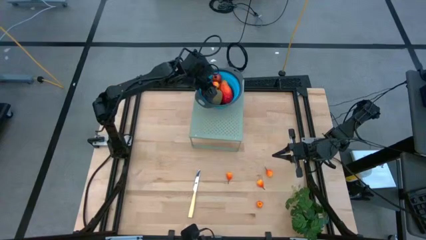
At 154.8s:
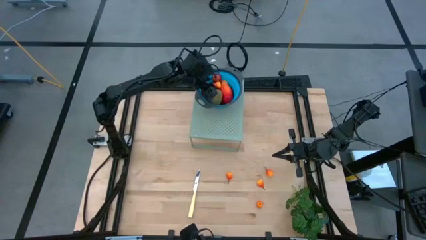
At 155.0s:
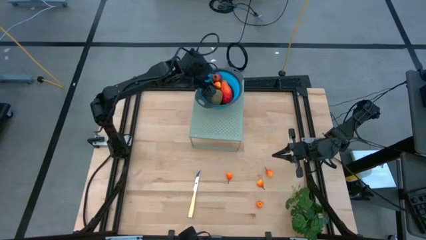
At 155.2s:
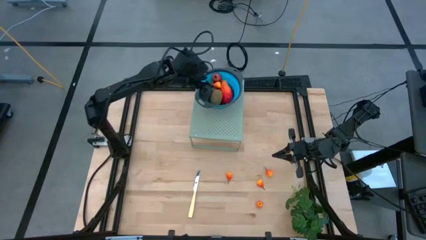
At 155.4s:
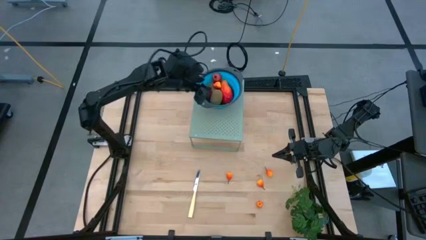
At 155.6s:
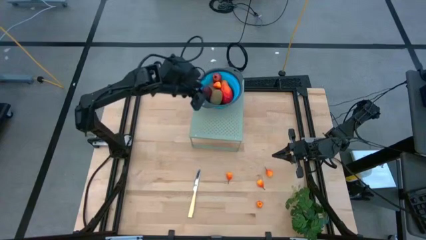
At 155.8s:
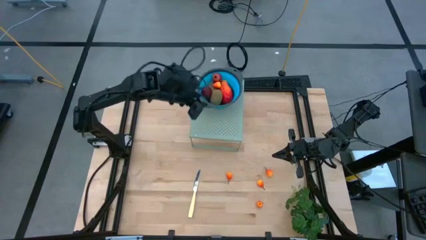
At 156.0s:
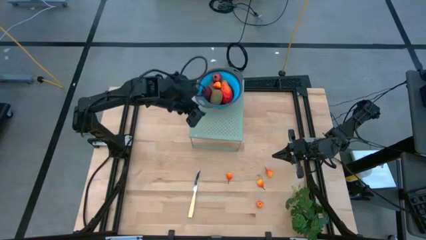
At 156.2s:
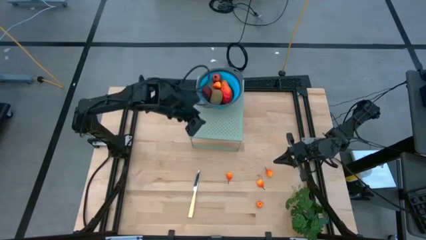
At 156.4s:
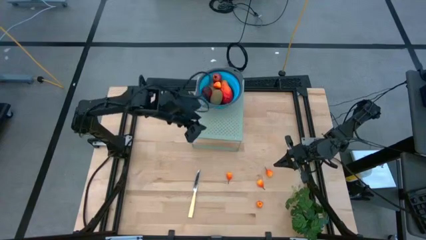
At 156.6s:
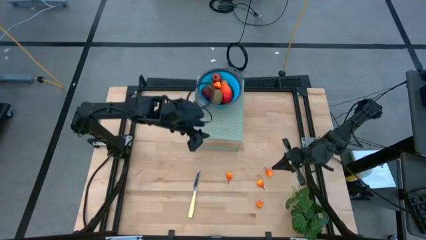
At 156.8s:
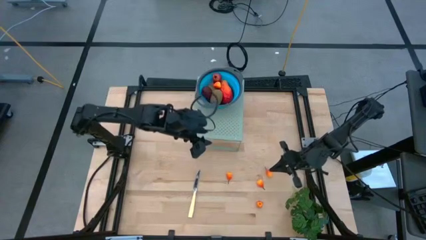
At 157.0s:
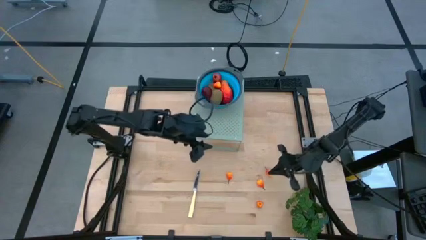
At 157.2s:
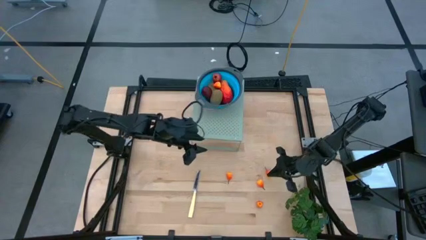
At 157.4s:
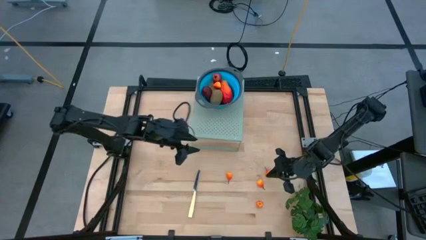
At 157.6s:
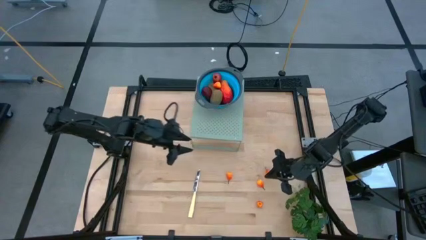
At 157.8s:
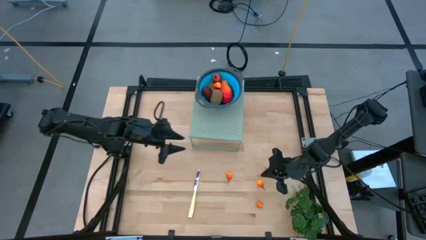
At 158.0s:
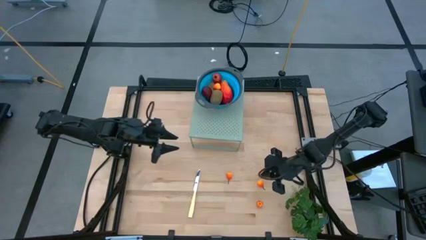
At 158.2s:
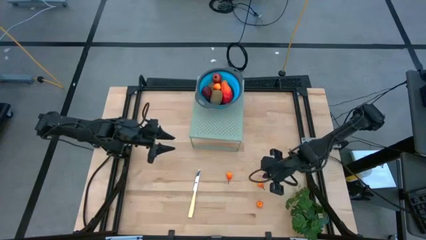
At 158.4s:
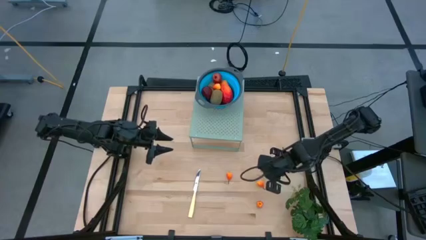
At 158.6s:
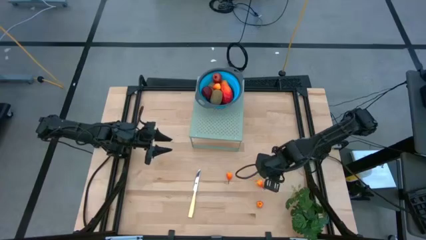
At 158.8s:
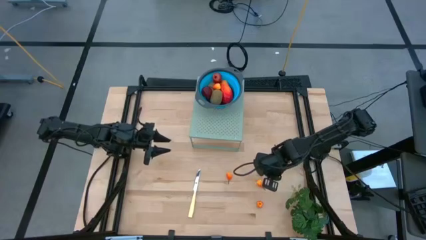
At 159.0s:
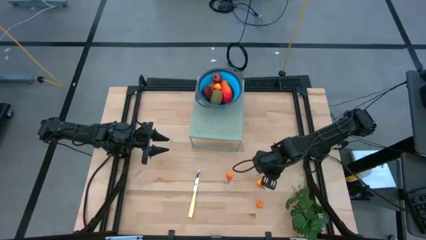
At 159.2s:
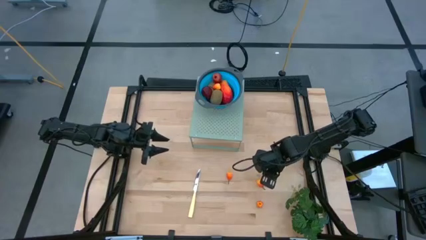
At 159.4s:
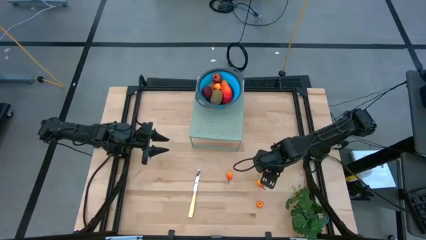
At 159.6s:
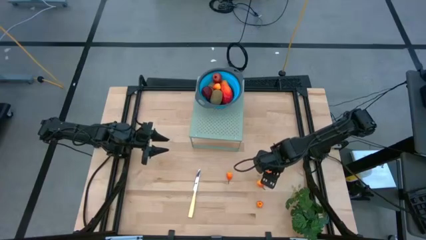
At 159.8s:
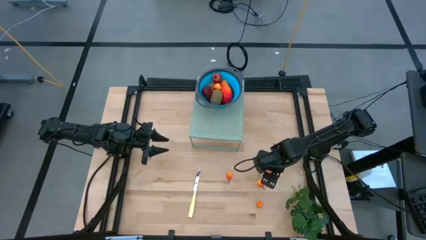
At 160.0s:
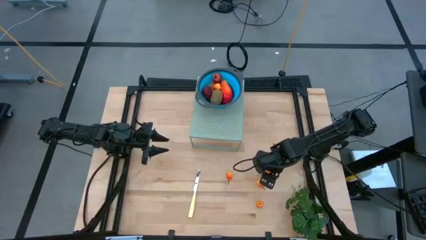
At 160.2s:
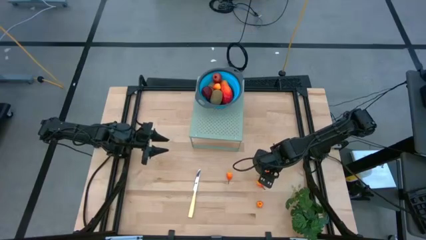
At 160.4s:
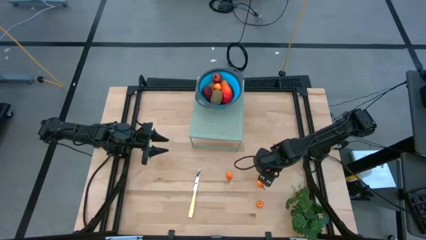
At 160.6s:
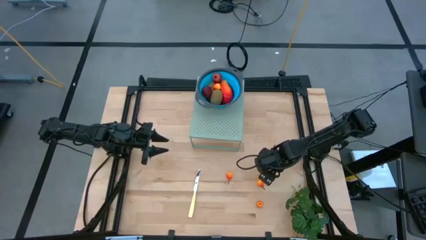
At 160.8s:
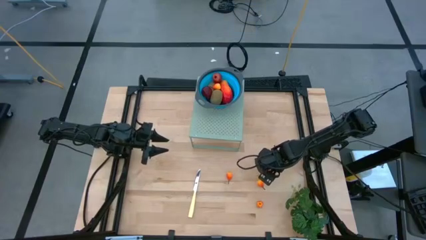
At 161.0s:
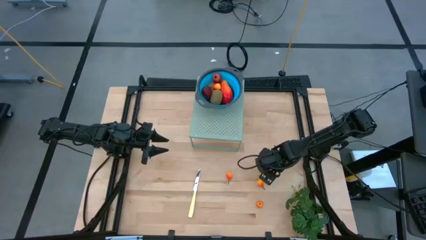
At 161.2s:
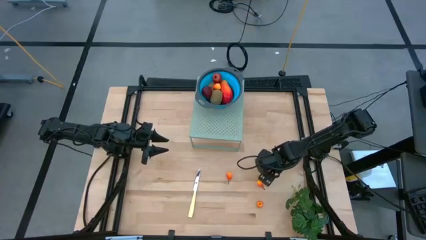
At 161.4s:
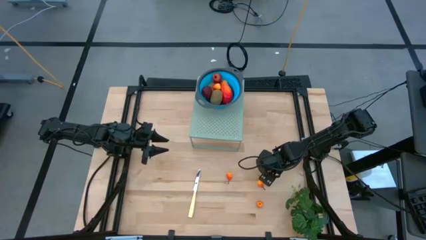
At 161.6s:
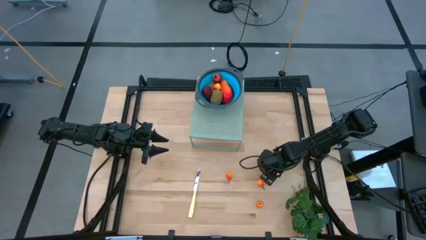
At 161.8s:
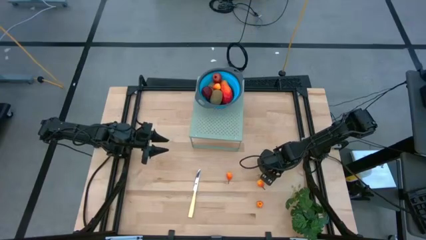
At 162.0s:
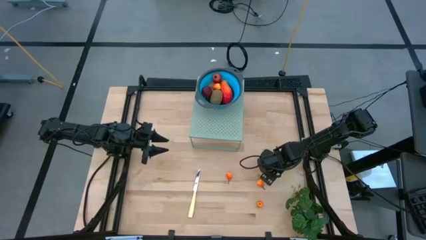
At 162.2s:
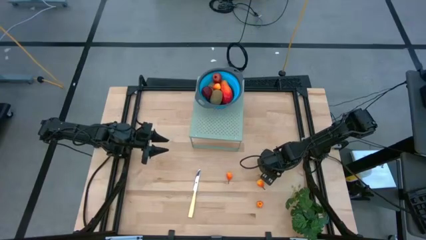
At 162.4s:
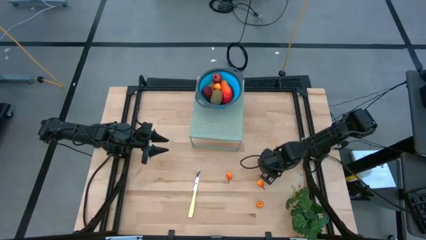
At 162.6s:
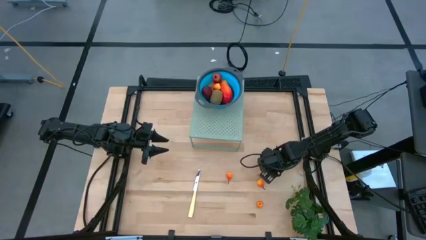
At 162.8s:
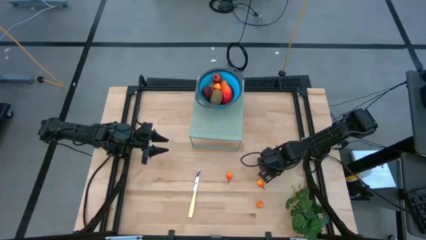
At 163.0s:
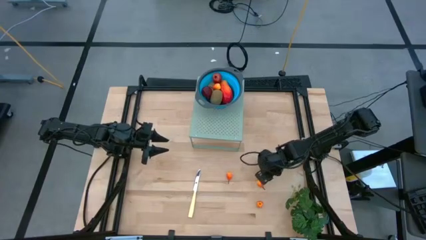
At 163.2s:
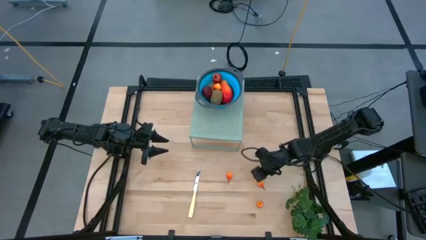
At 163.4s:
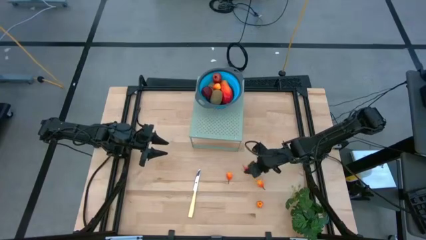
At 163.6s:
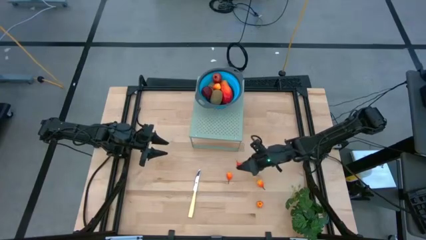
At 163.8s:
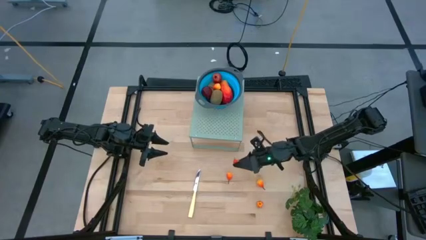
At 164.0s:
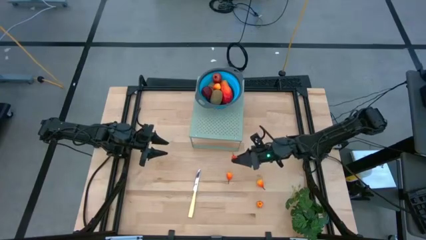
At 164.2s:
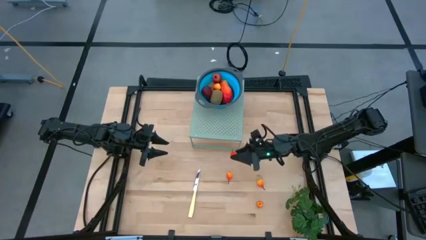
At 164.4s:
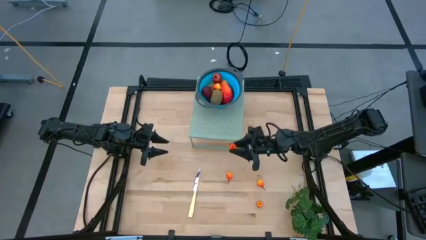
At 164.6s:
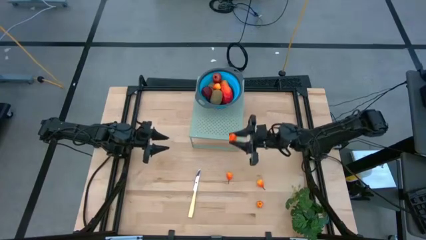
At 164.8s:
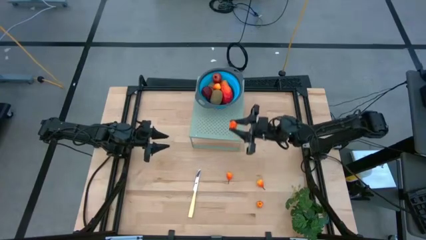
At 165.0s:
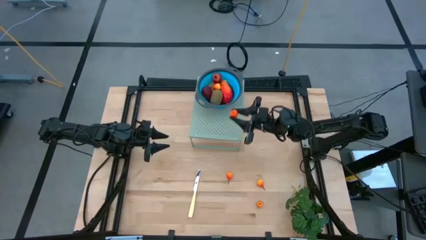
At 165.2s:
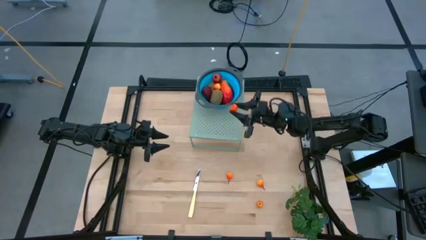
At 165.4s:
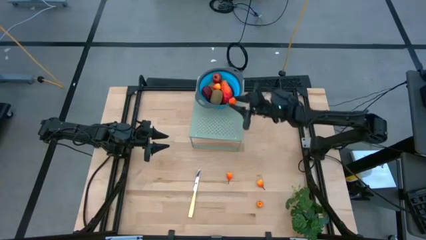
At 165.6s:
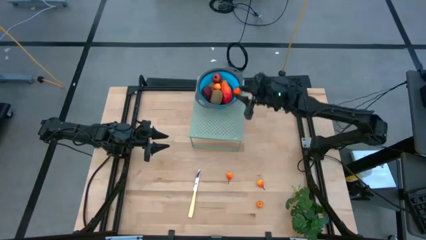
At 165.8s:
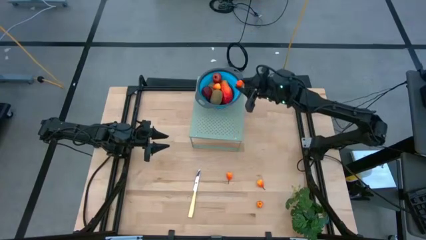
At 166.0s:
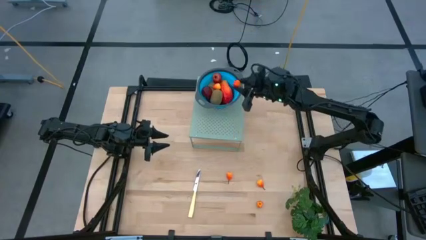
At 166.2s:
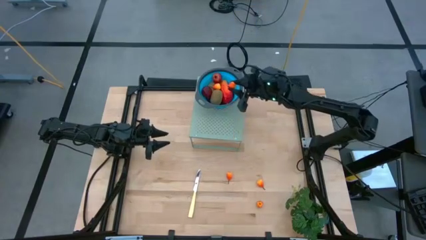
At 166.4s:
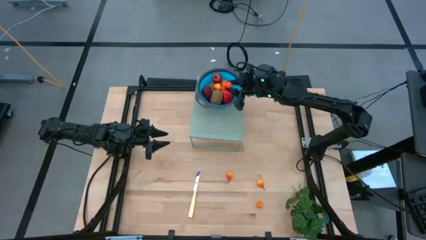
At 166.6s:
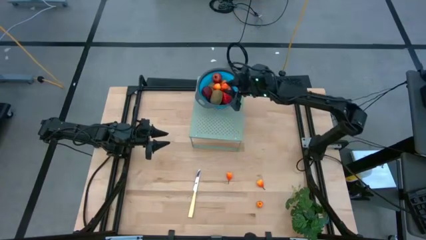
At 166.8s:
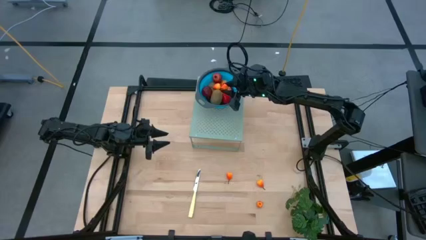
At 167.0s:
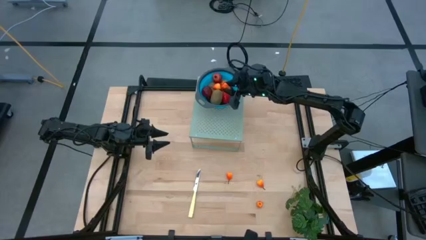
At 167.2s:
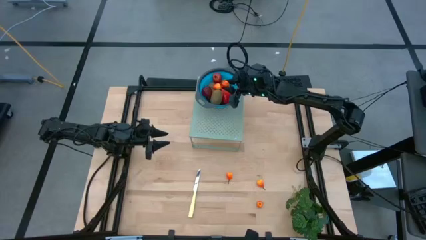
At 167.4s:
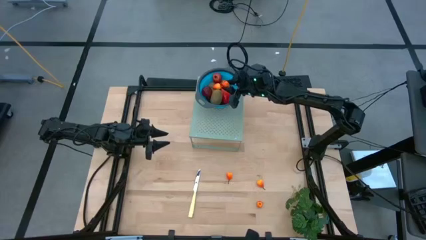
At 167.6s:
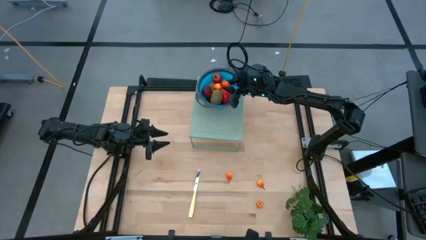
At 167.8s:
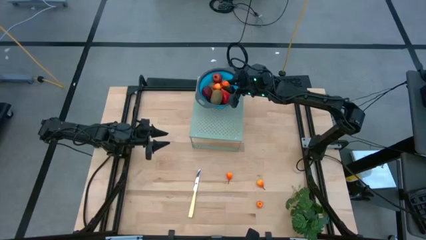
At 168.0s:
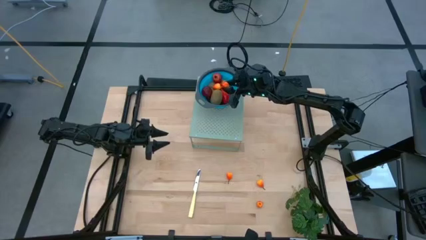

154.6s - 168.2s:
Task: Pick & Place Fruit
Put the peach into the blue strainer bowl on the shelf
